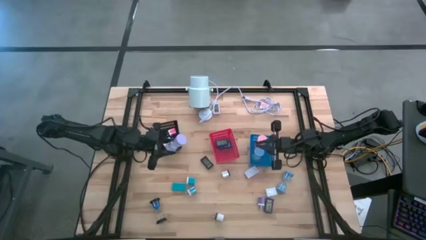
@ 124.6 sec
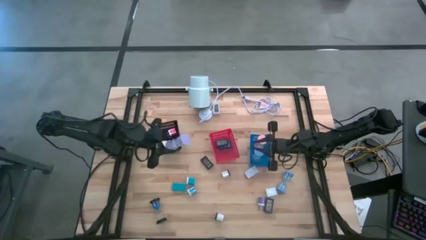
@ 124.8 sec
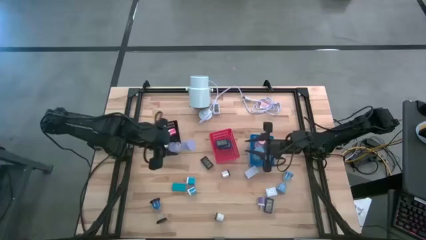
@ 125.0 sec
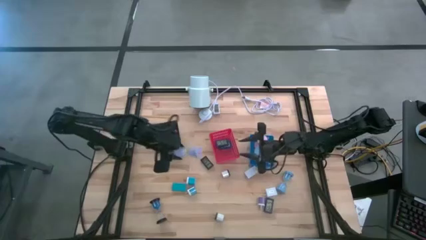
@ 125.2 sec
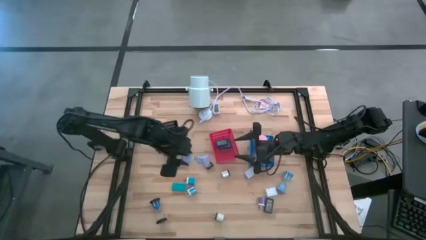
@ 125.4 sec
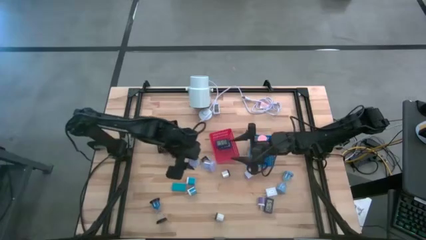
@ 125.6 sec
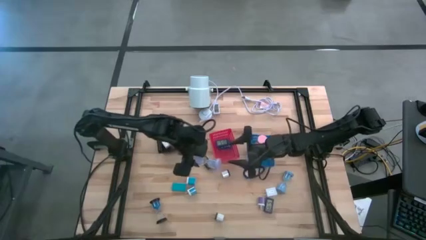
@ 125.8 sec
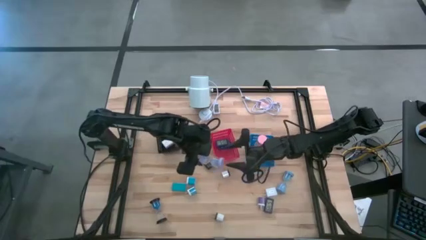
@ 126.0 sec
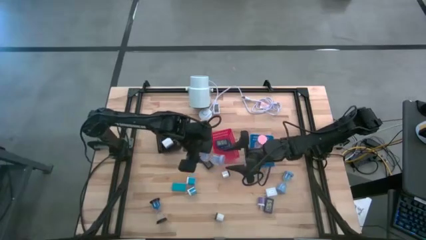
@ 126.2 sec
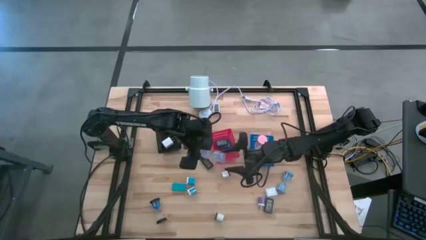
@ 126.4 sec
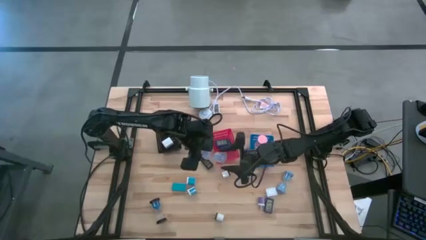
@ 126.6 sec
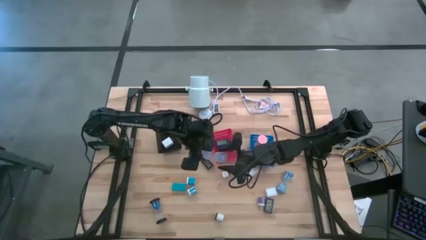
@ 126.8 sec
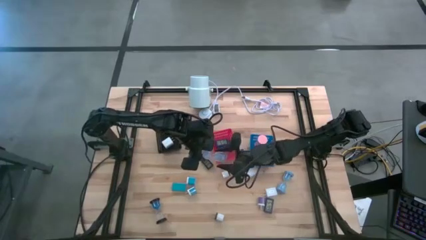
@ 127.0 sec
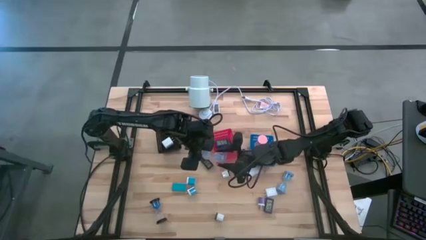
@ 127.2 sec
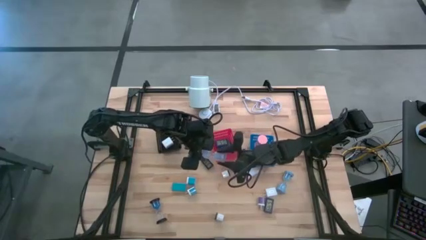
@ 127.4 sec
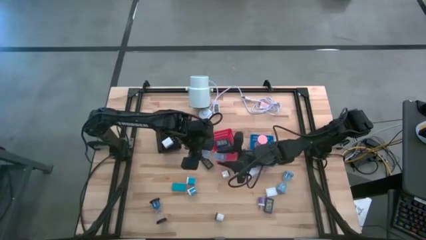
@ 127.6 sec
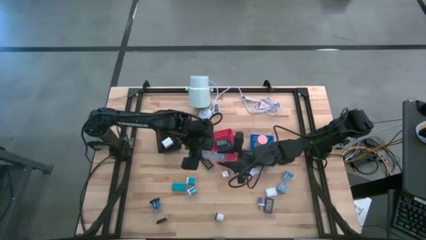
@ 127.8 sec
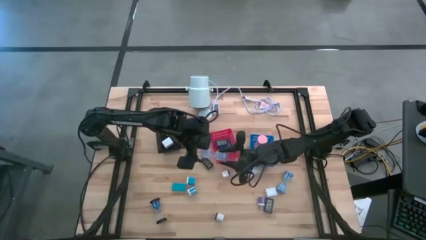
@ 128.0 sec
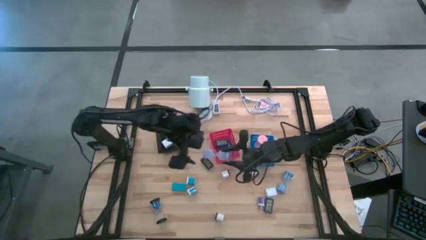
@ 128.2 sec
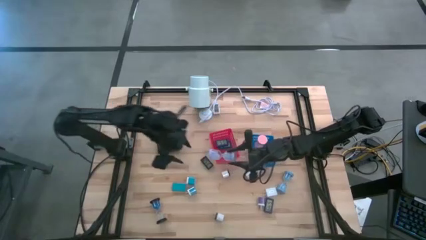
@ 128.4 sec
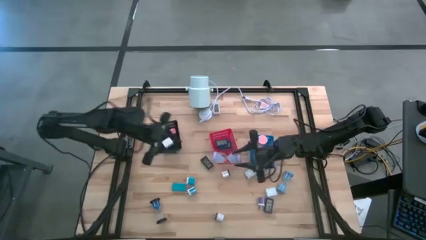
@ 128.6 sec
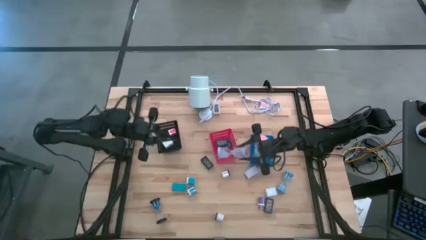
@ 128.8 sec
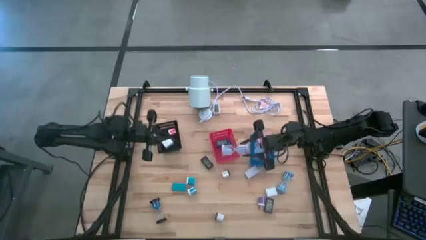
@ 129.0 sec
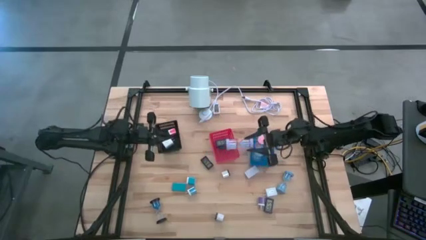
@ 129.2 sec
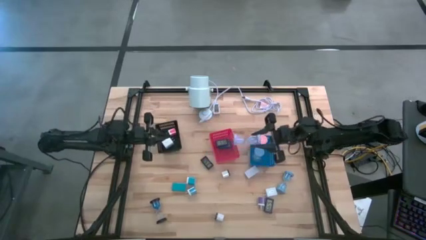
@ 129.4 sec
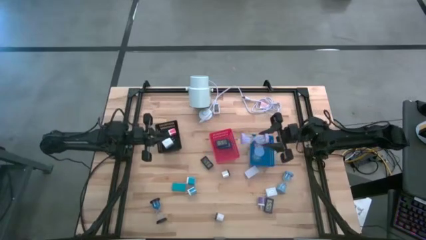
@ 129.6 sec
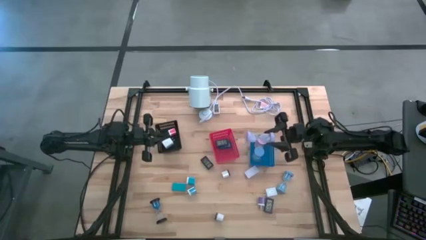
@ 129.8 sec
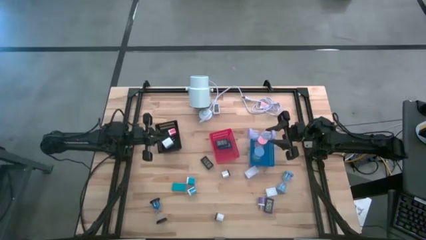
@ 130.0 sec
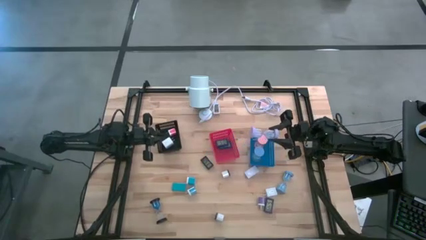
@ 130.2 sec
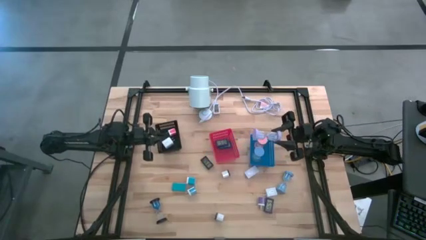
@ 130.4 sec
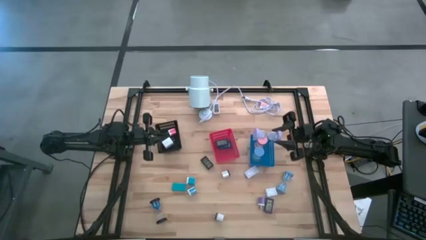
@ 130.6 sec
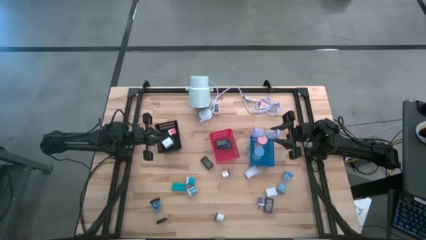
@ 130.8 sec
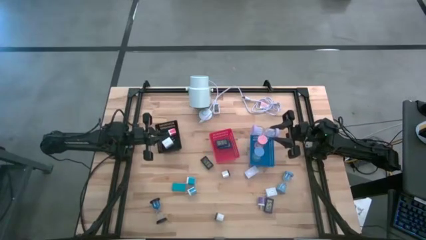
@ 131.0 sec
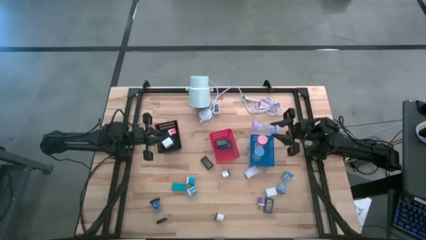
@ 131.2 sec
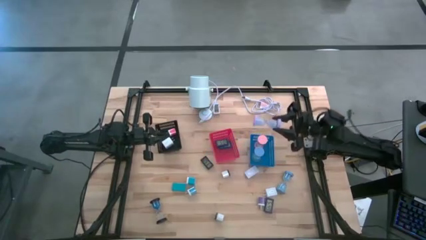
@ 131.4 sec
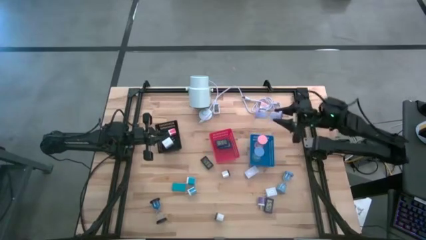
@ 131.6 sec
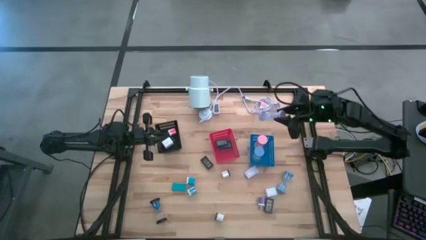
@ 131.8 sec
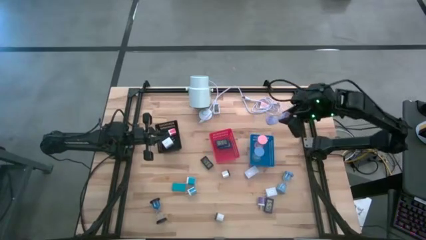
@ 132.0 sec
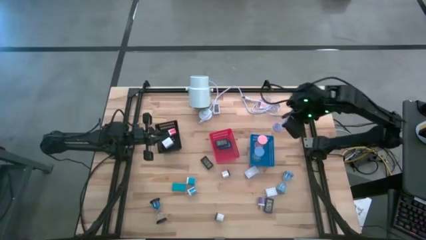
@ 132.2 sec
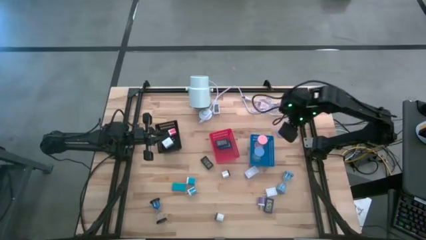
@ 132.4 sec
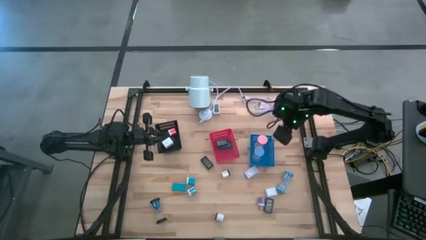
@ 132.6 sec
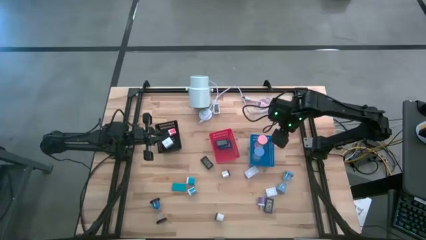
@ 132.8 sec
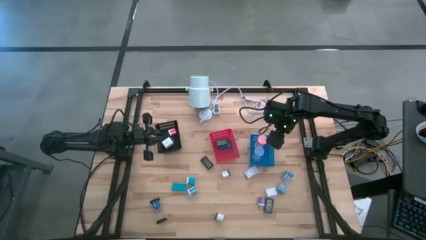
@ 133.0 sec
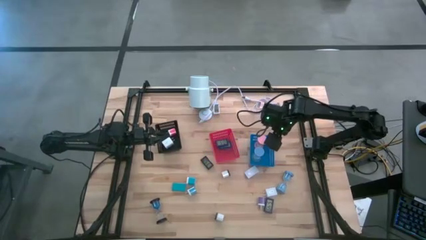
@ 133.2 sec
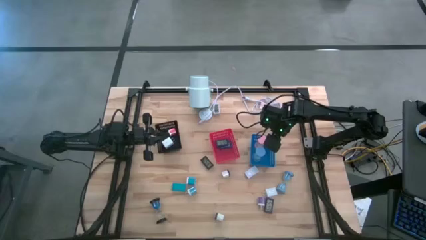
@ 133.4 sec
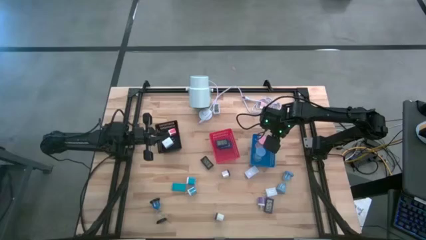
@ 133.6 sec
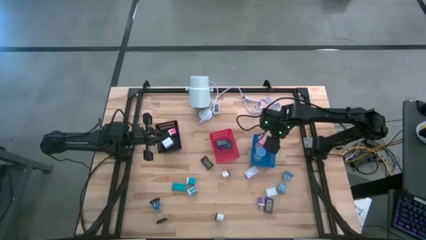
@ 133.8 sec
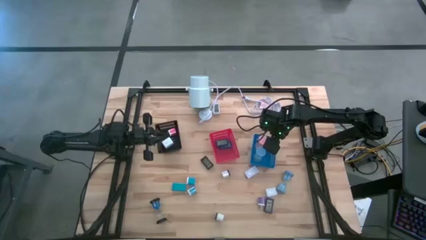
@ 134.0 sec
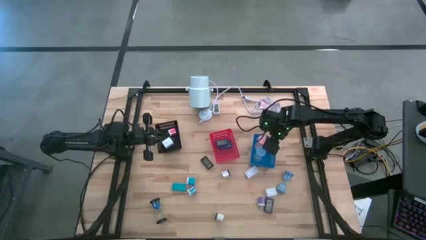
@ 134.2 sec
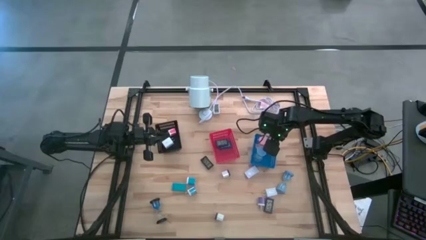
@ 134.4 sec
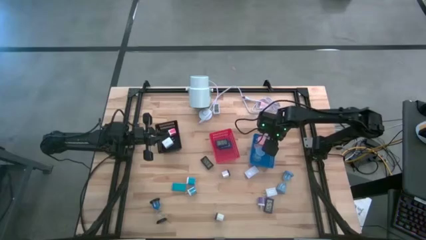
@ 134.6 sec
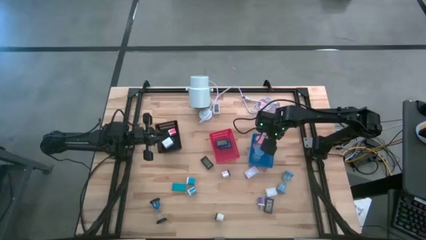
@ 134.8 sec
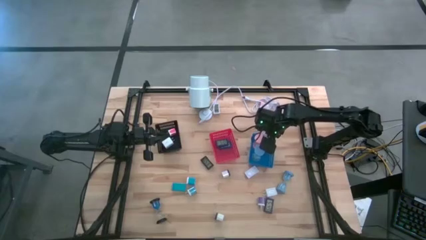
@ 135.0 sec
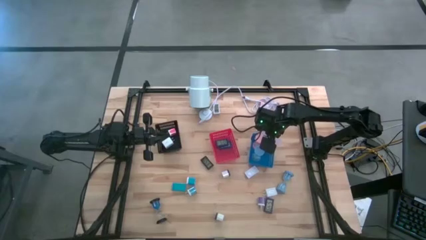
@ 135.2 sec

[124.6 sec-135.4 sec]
Task: Pick & Place Office items
Put the purple hourglass into the blue bin

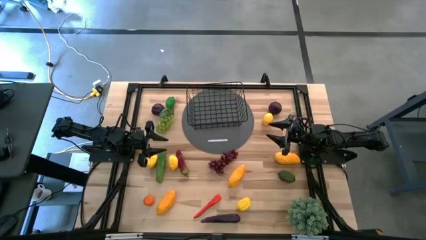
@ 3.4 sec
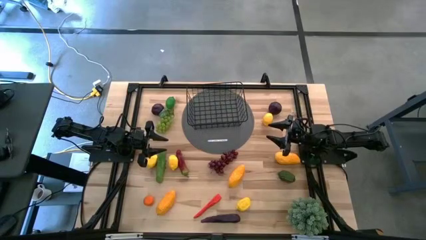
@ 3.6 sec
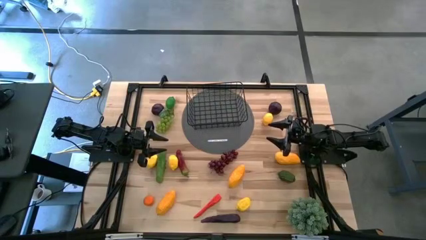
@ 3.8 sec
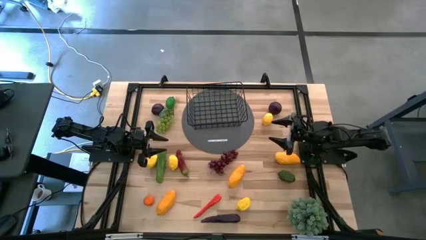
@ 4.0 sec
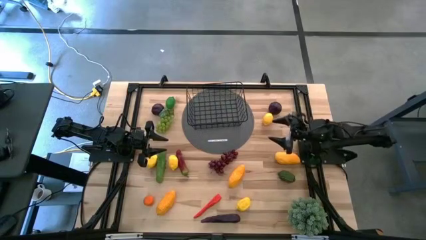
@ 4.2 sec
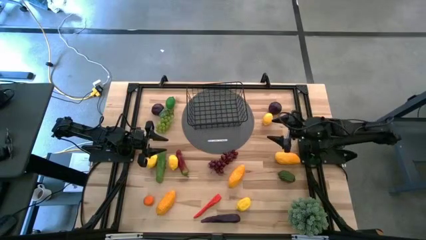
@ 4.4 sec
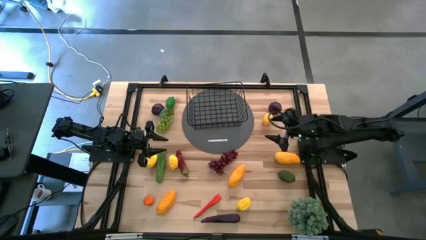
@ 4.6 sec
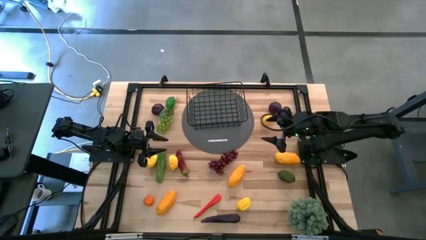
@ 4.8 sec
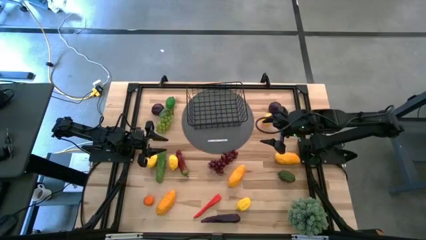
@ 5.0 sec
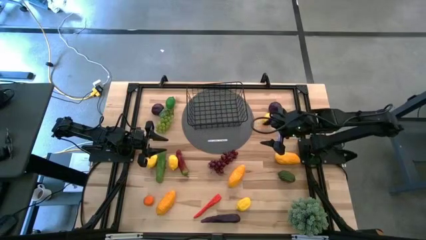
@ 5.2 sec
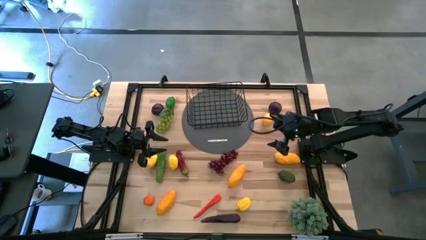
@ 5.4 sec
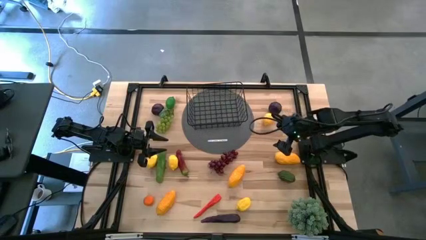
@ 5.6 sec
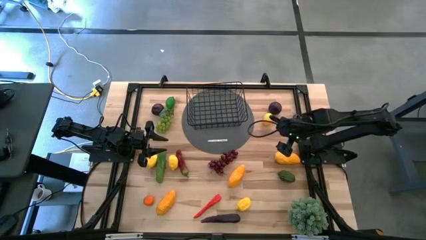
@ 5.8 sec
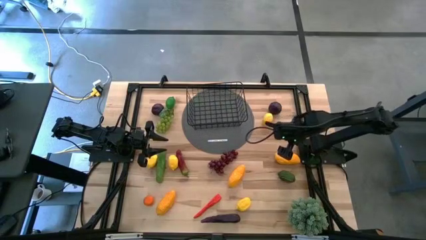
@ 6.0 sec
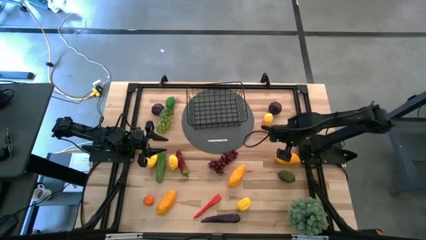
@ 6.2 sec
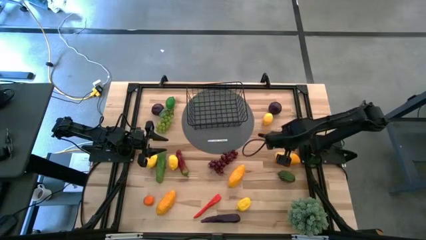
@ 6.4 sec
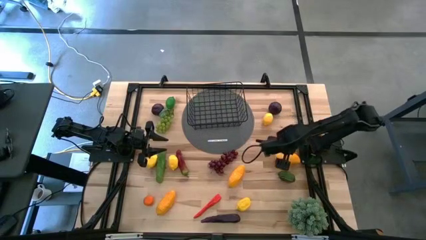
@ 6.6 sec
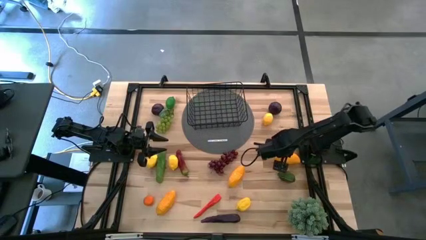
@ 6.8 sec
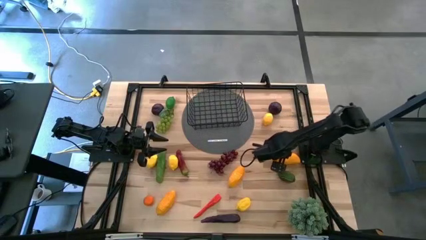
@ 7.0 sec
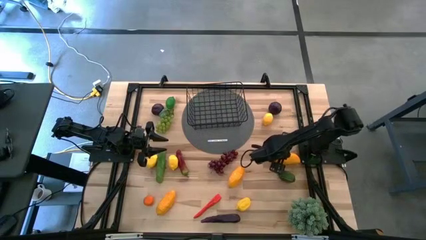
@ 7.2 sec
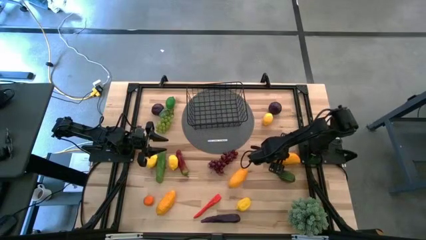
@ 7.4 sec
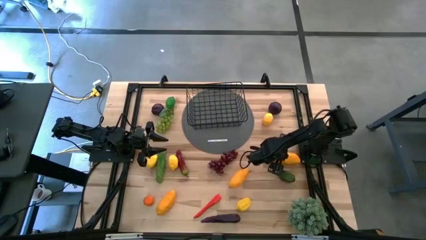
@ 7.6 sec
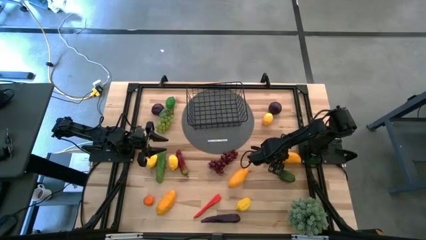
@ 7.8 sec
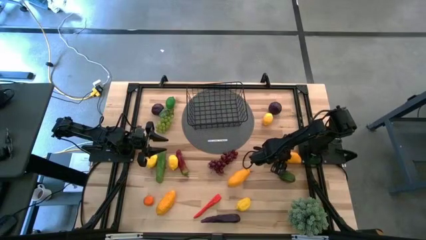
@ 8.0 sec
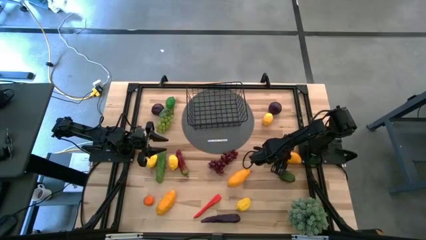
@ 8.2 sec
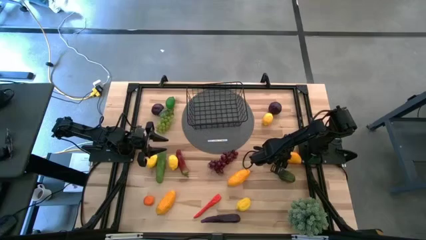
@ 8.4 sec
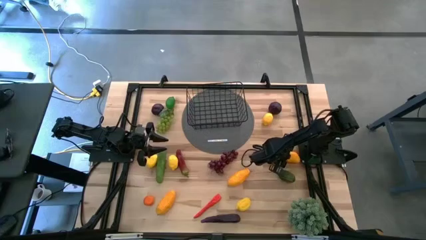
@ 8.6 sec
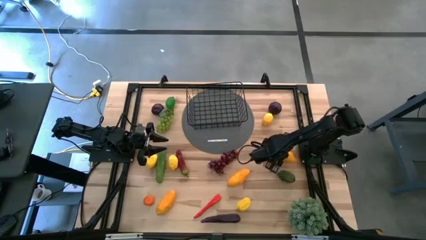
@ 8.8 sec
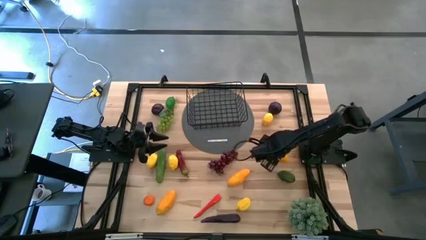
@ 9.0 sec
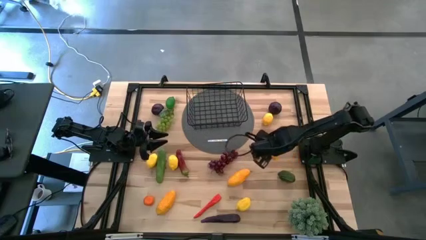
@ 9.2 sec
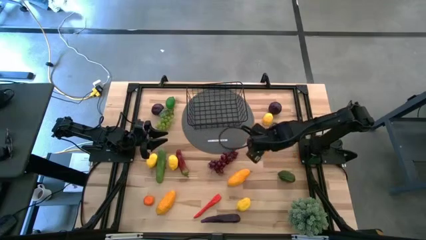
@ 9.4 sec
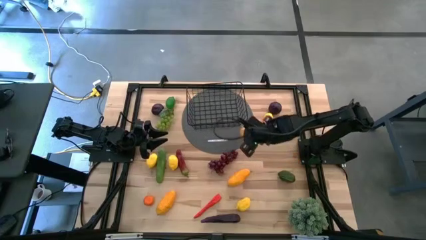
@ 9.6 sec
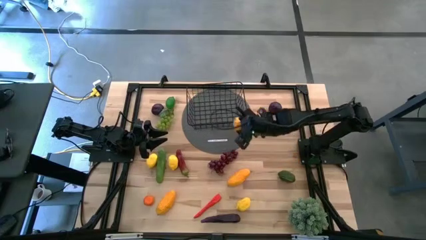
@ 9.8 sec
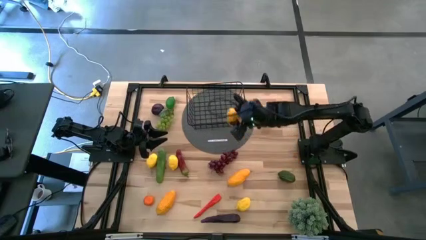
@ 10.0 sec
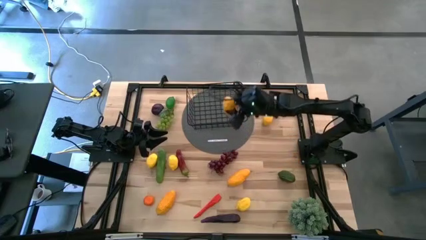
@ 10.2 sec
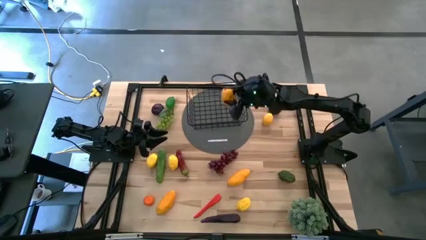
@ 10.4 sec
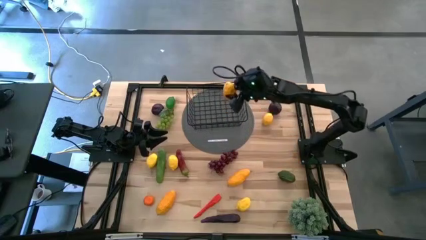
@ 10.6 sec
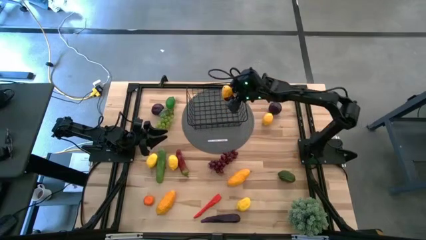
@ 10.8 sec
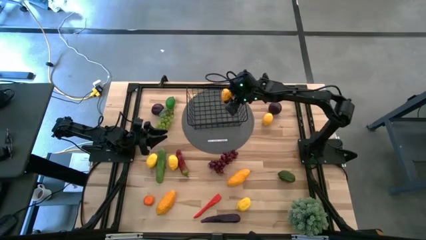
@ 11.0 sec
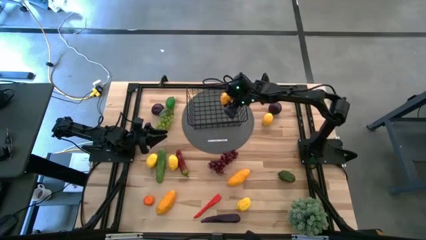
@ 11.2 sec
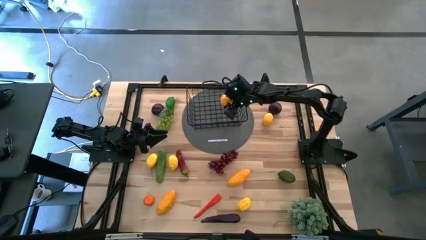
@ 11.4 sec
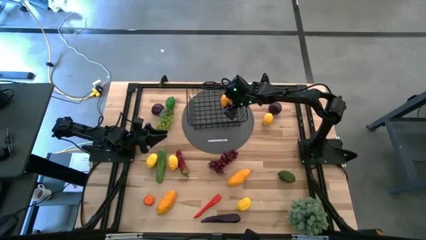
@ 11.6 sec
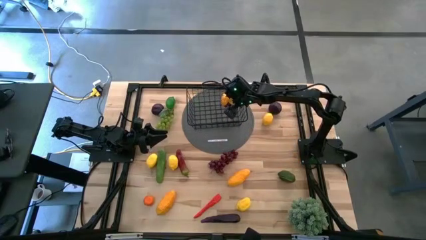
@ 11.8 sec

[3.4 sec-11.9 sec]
Task: Build produce basket
Put the top right mango into the wire basket
